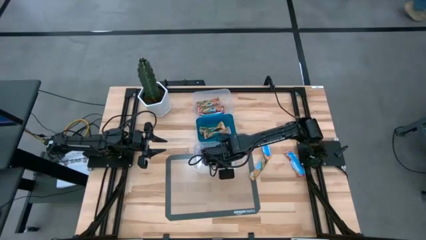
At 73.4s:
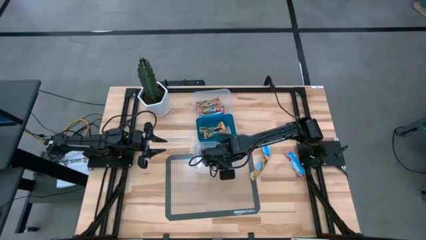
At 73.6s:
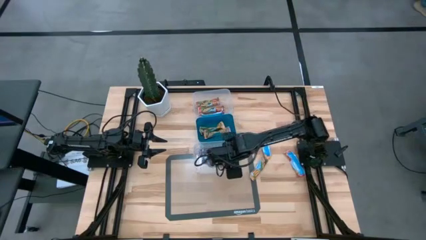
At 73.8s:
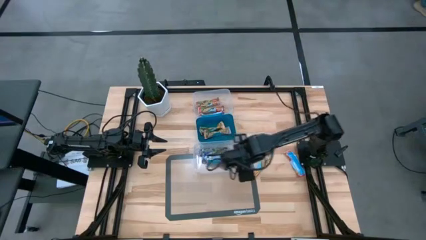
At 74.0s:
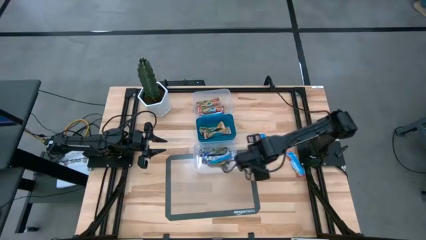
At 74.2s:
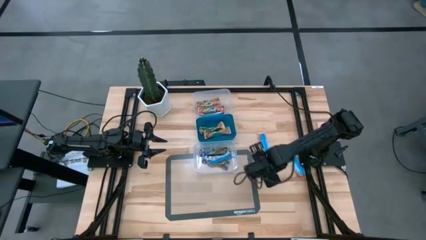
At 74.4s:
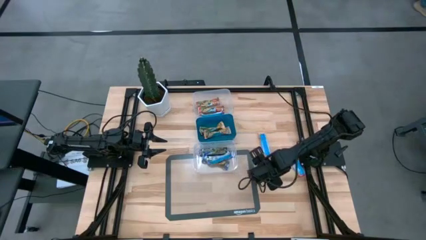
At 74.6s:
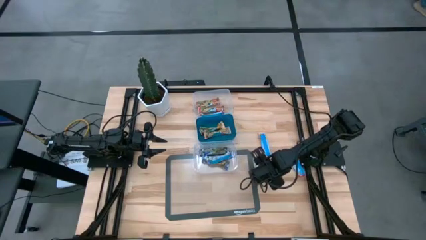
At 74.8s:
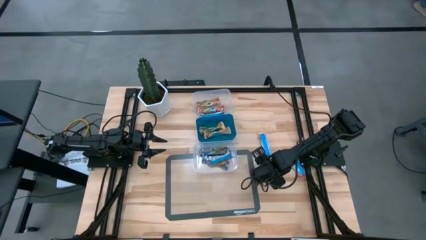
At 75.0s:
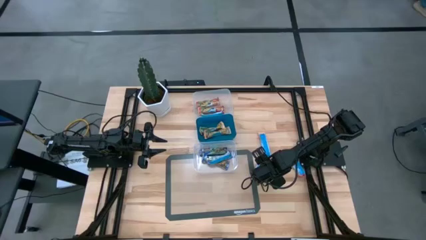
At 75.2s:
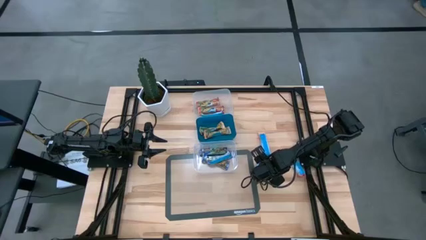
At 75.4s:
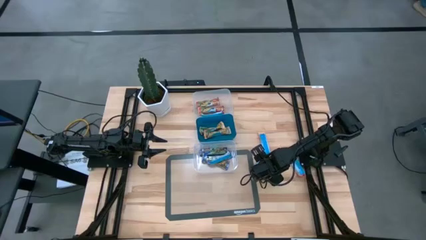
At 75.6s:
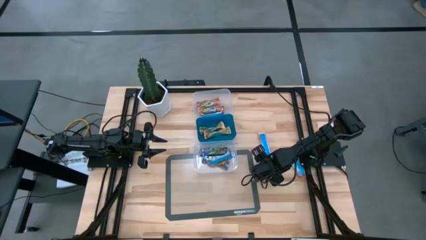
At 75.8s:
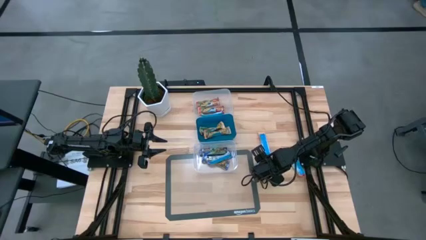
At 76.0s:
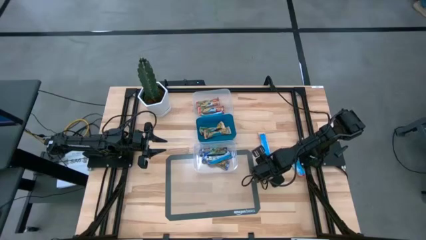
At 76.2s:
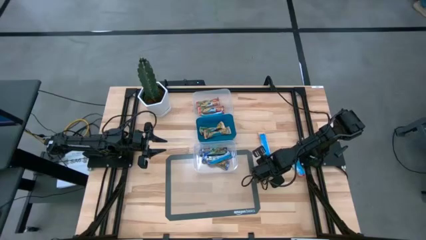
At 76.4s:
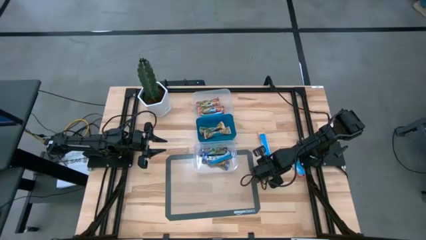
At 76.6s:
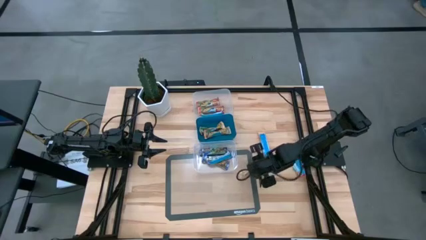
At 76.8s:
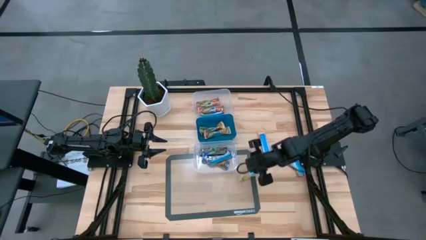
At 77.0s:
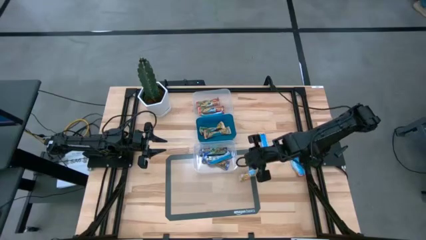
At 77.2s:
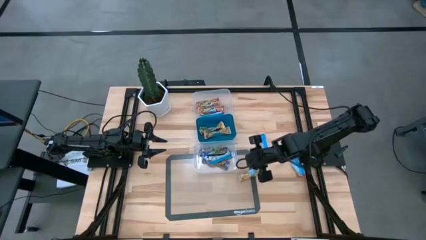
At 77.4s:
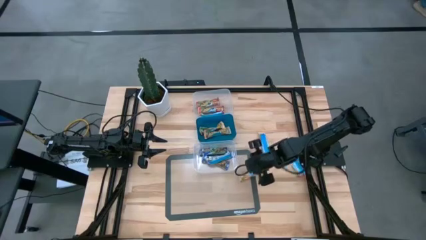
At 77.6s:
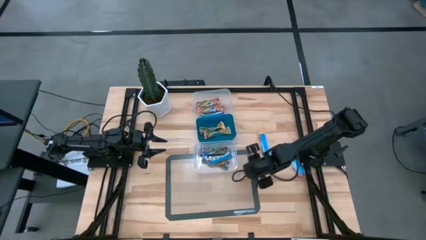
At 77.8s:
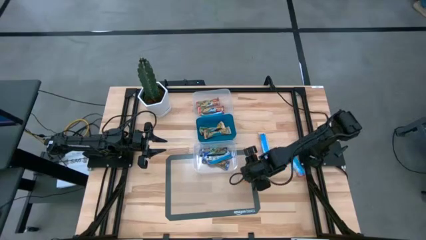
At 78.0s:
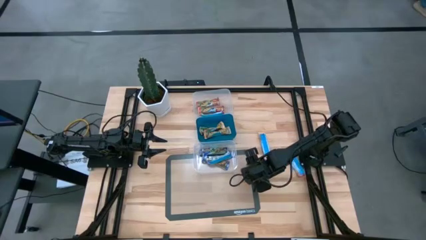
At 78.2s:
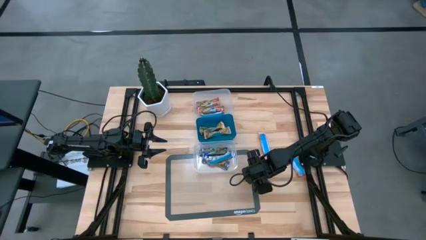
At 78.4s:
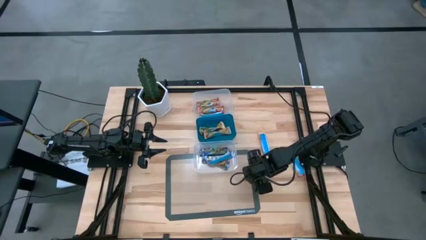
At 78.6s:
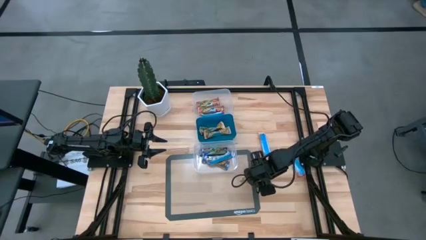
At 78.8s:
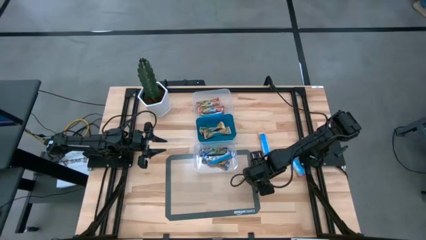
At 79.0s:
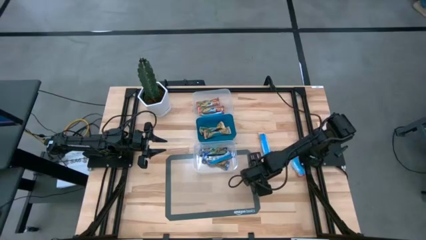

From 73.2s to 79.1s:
Task: Pick and place Granola Bars by type
Put the yellow granola bar into the blue bin

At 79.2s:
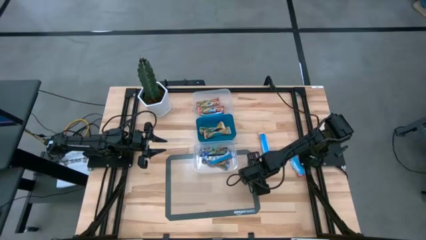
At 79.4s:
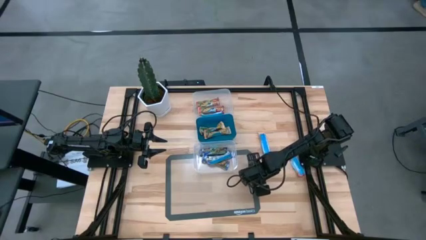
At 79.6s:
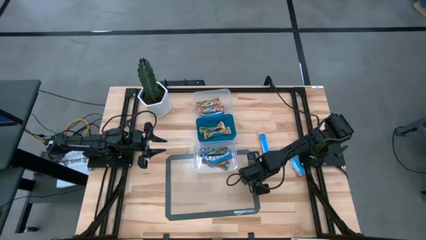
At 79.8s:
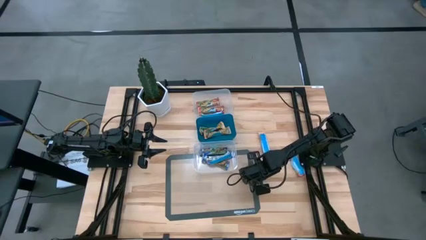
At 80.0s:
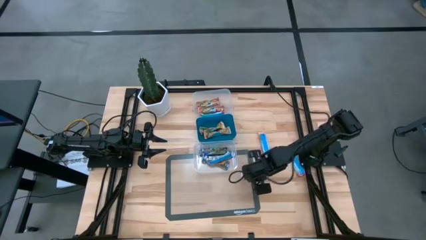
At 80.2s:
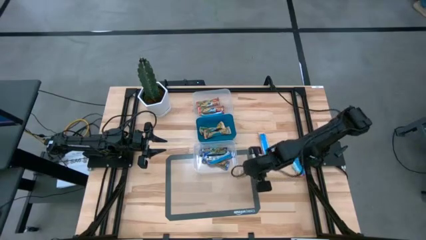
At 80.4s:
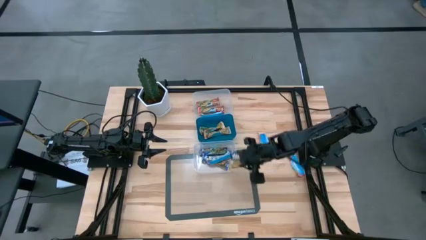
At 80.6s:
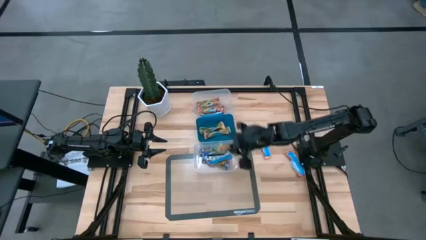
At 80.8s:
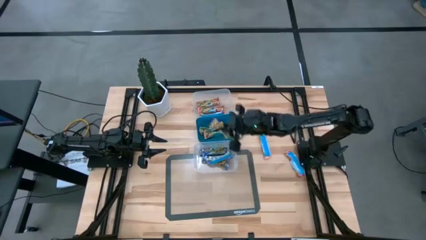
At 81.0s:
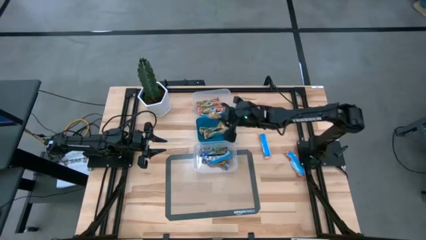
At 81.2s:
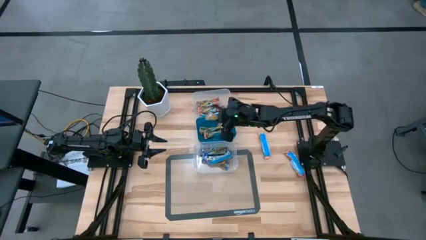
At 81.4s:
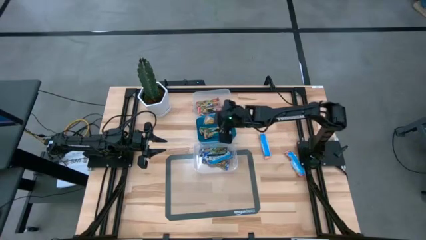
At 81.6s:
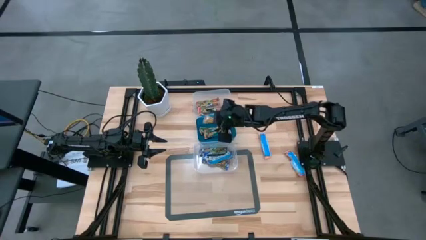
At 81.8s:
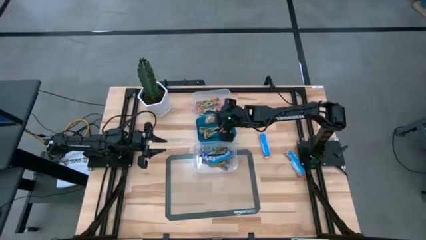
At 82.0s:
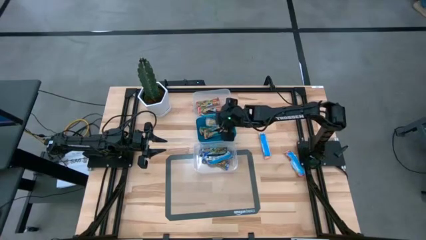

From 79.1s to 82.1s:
Put the yellow granola bar into the blue bin

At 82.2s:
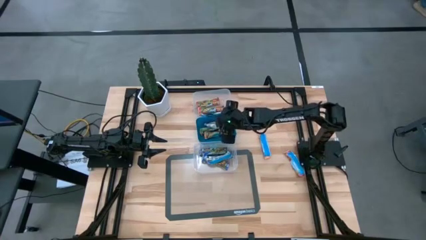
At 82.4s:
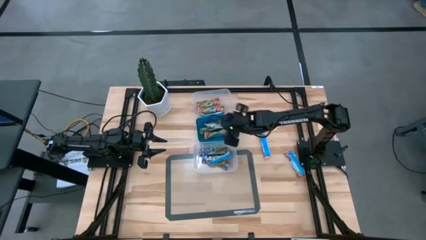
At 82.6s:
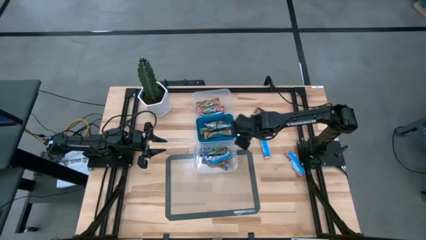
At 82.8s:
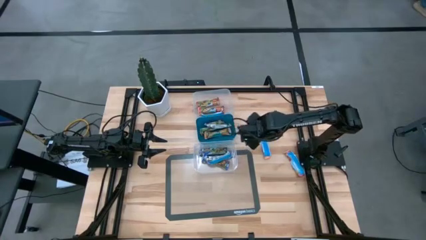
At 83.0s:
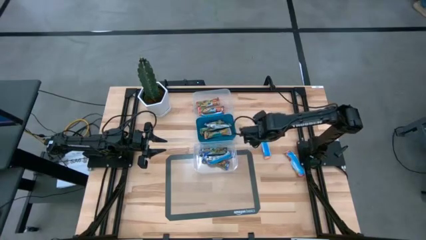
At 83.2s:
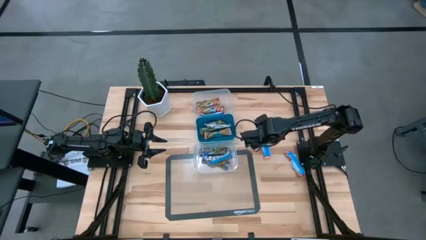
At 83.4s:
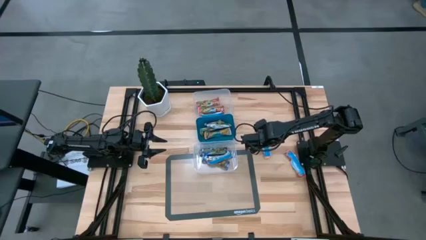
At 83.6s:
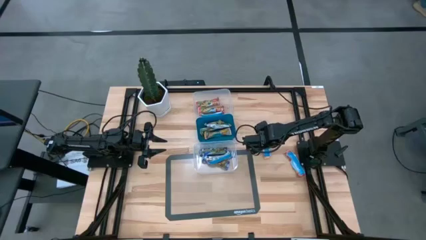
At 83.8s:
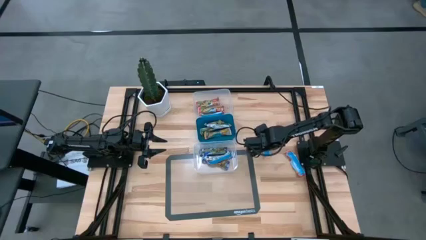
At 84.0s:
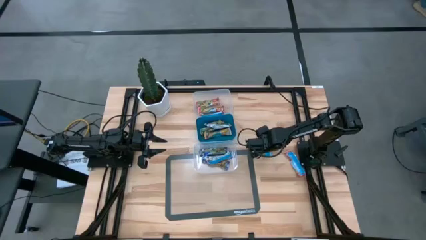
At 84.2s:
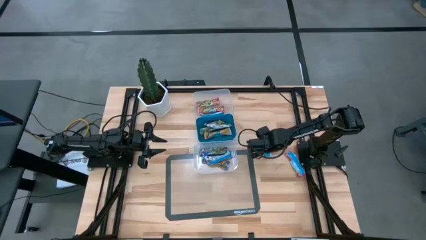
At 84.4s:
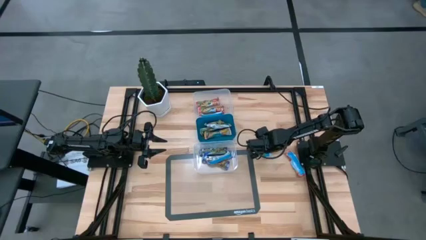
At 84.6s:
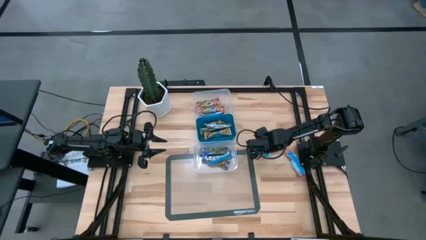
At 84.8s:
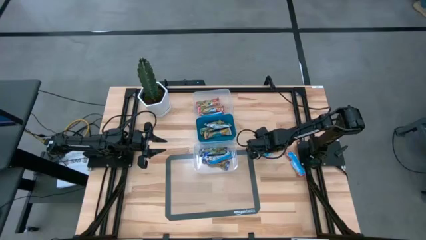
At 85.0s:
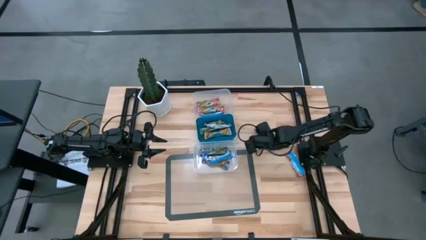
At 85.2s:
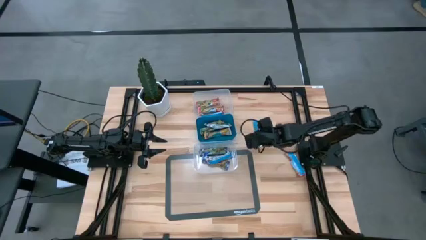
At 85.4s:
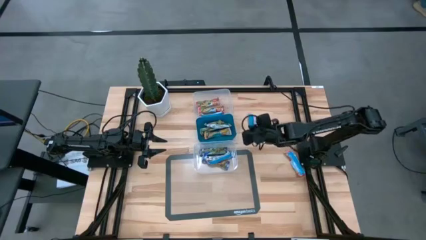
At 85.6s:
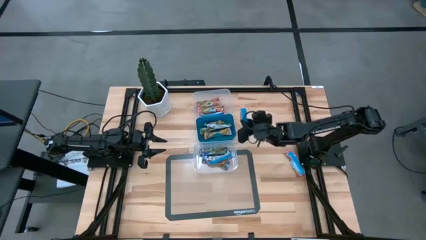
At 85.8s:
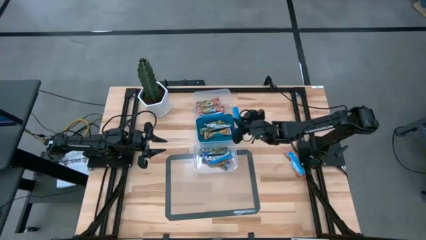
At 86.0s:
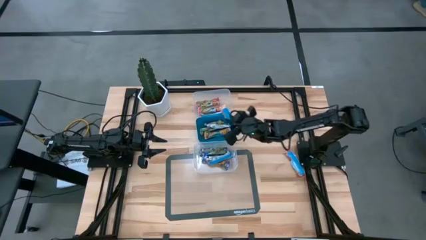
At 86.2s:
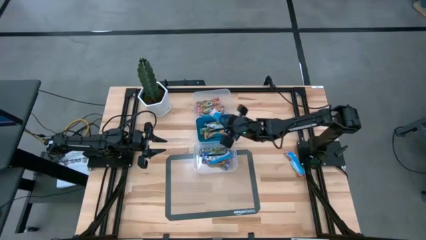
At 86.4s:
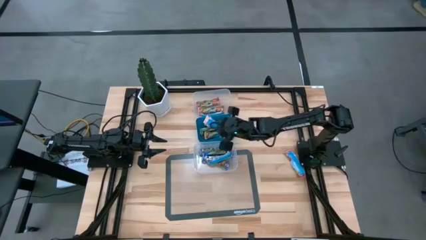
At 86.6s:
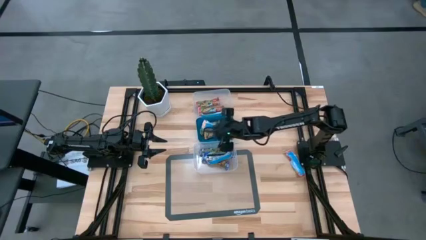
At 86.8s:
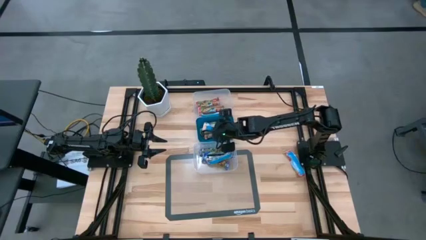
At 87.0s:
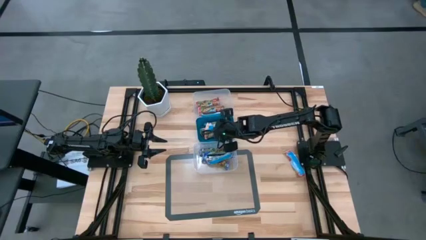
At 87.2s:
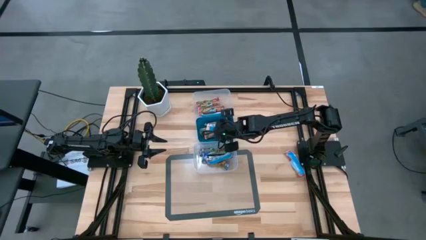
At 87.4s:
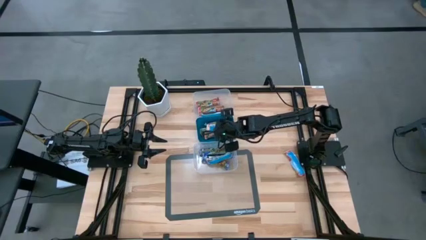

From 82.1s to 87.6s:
Put the yellow granola bar into the blue bin

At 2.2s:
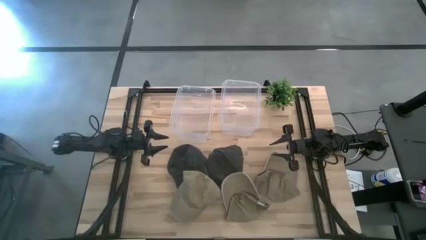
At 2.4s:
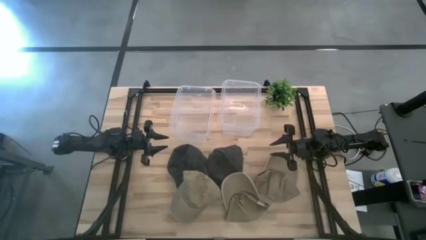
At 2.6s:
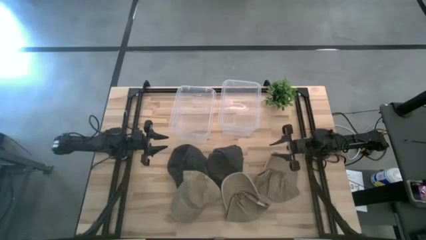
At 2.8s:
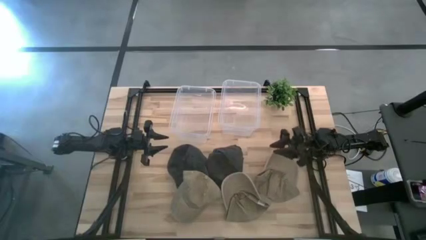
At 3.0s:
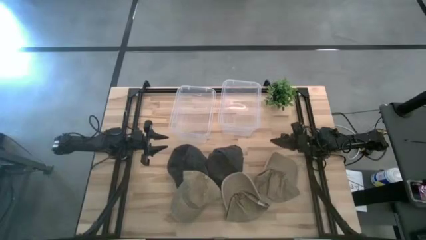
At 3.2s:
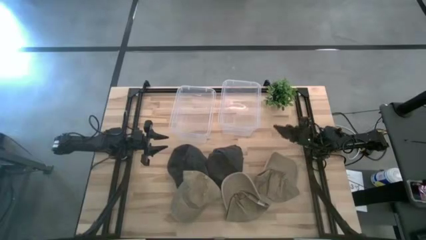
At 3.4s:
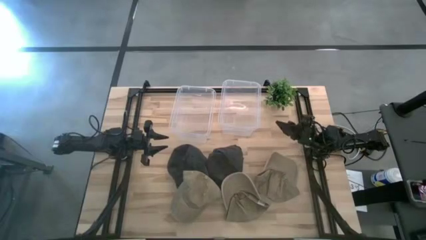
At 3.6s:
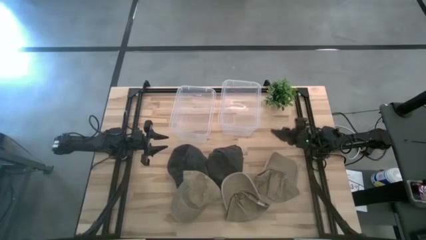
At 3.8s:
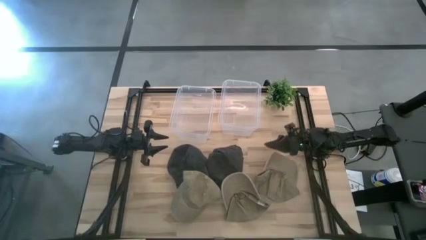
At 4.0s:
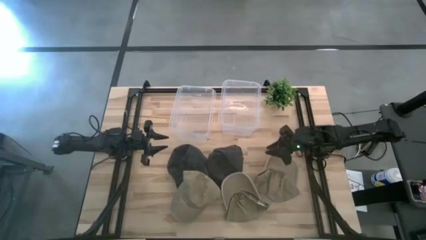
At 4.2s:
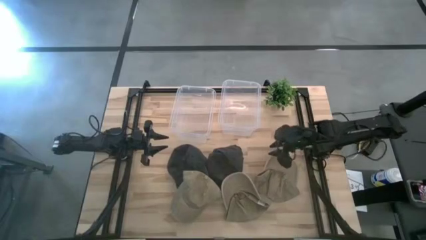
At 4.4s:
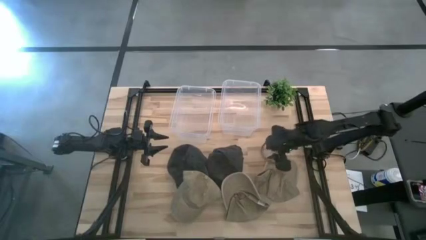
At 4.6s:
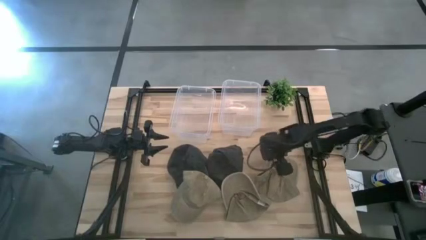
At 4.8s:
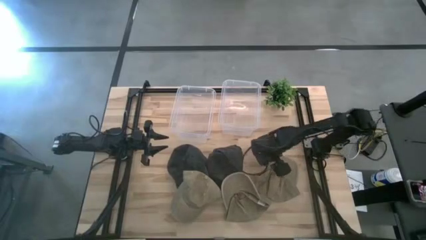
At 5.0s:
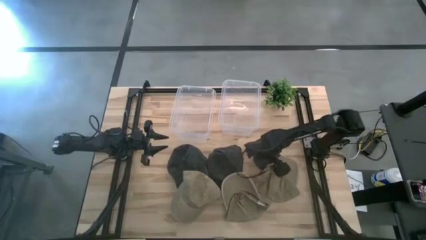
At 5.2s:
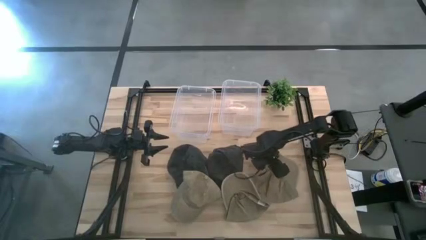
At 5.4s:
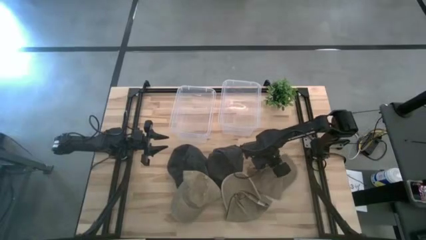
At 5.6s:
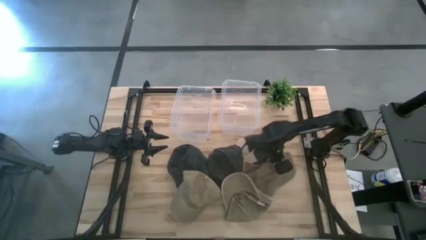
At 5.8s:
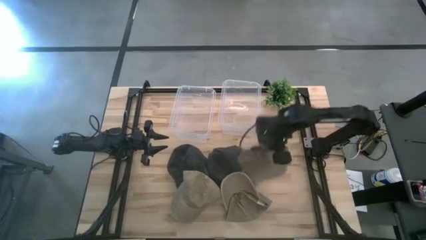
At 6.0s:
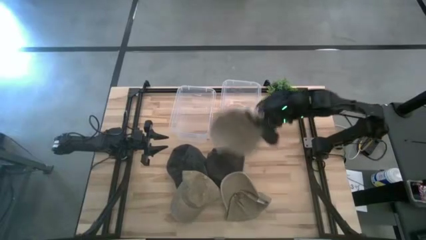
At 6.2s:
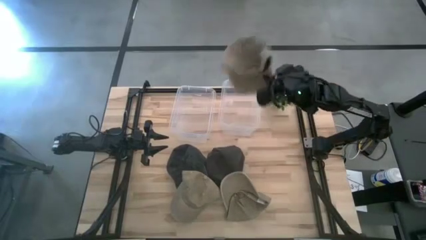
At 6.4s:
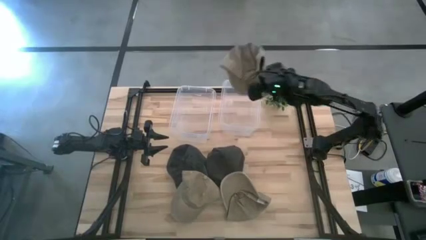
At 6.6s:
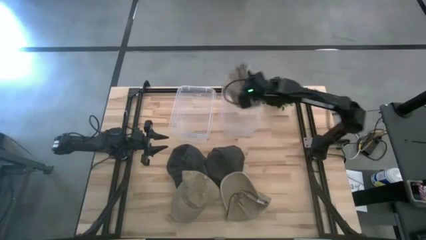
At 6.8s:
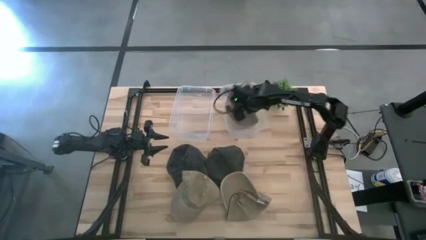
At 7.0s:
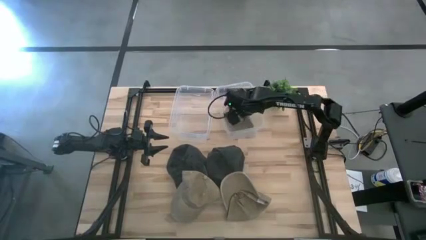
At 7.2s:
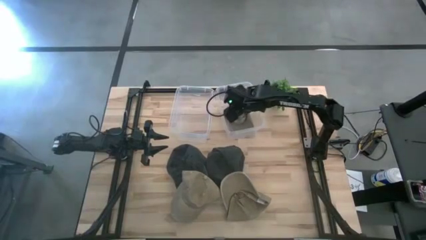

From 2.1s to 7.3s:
Task: Pick & Place hat
Put the right brown cap into the right transparent bin
